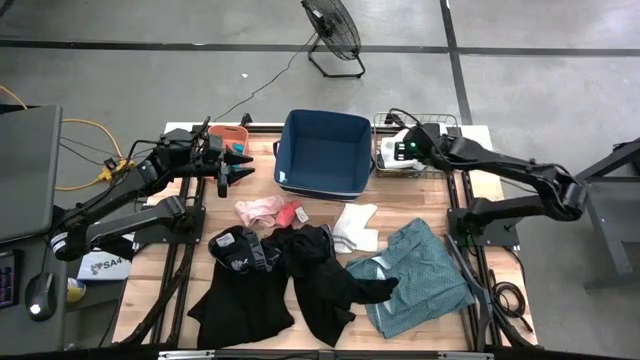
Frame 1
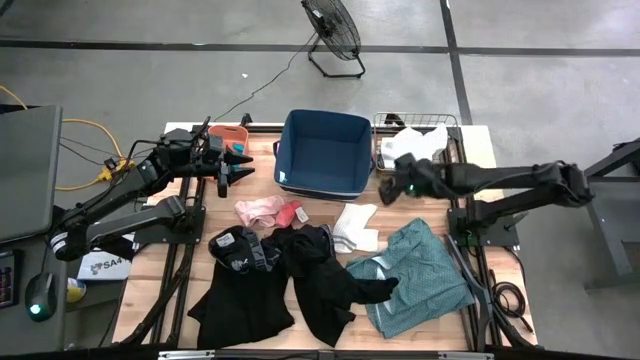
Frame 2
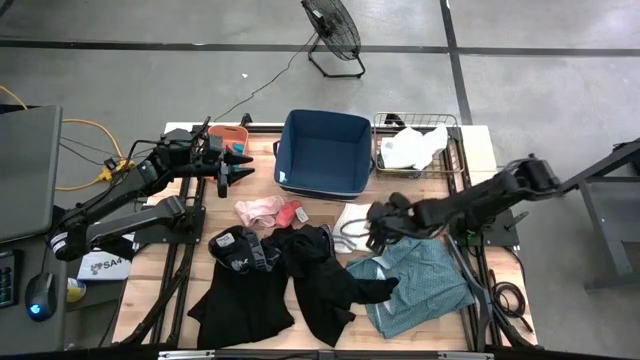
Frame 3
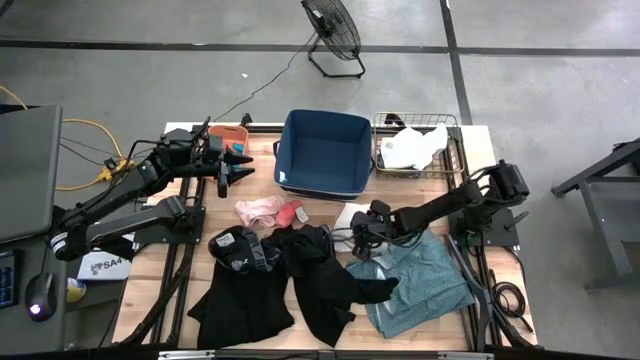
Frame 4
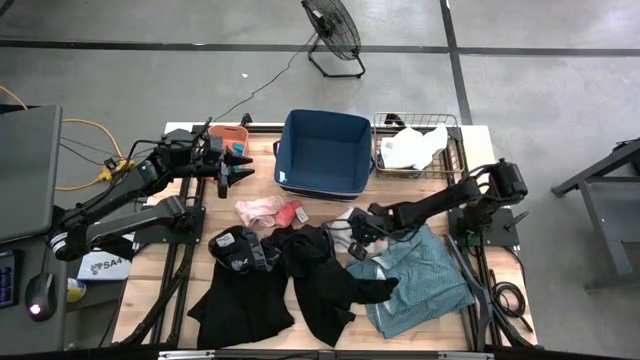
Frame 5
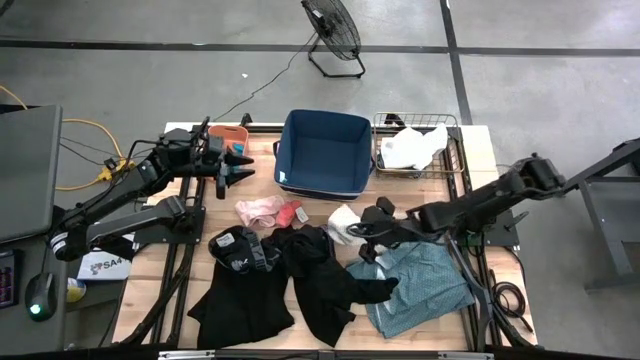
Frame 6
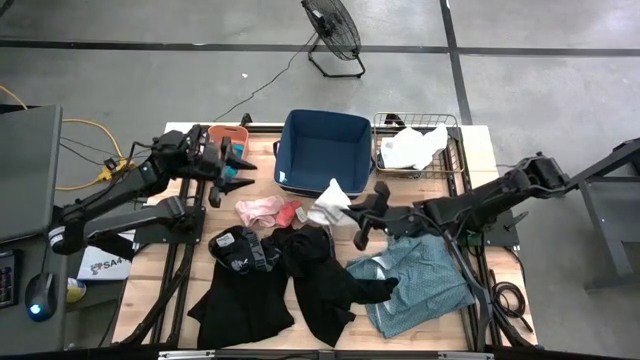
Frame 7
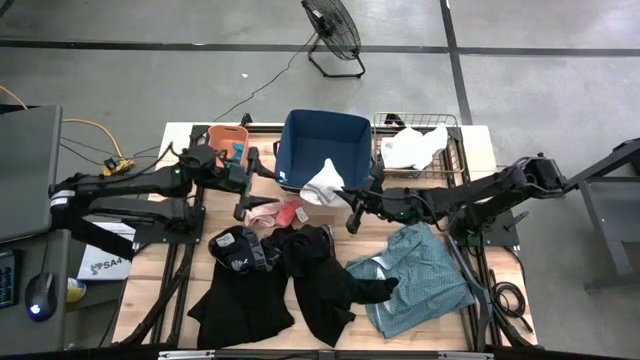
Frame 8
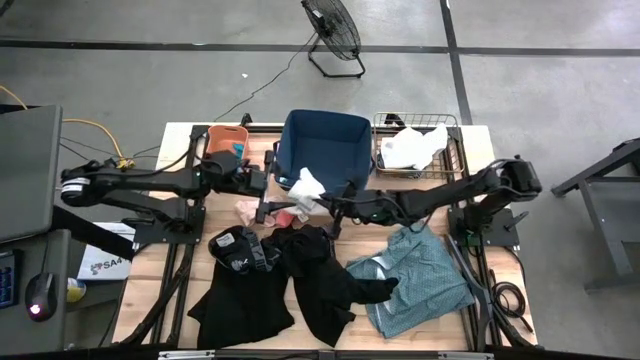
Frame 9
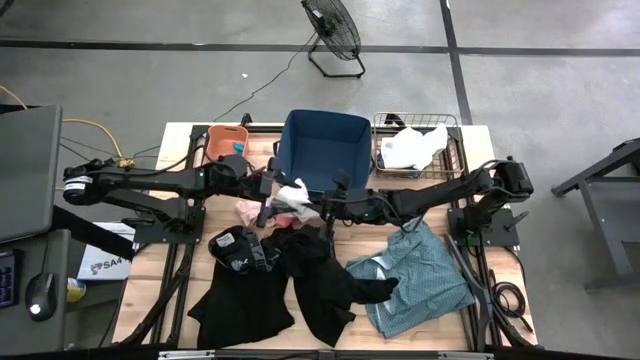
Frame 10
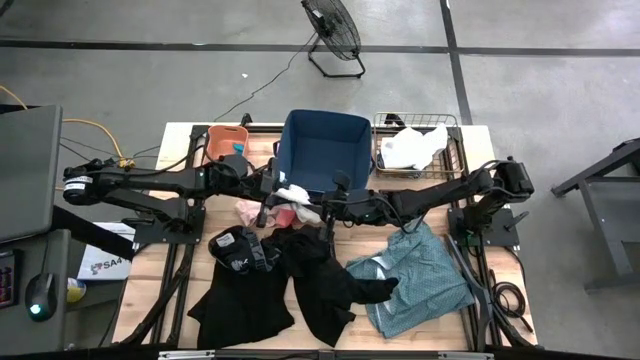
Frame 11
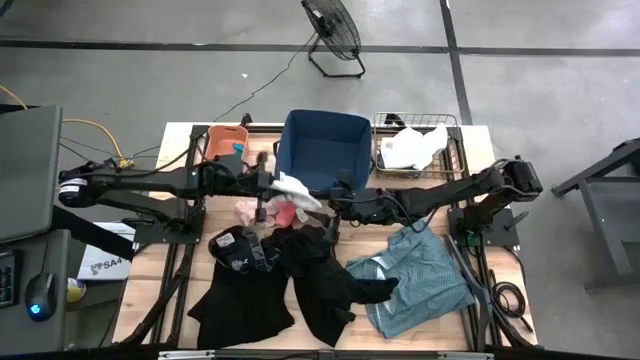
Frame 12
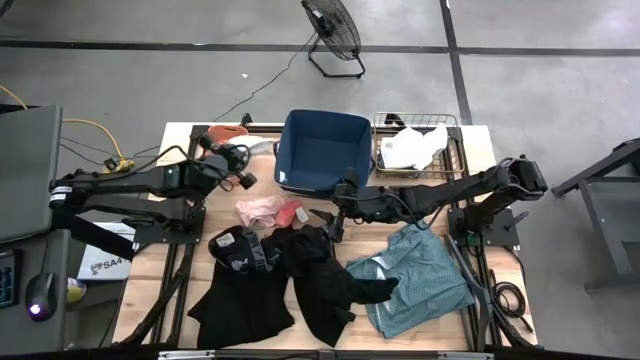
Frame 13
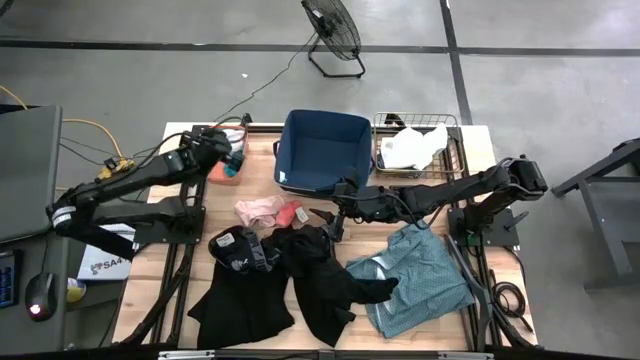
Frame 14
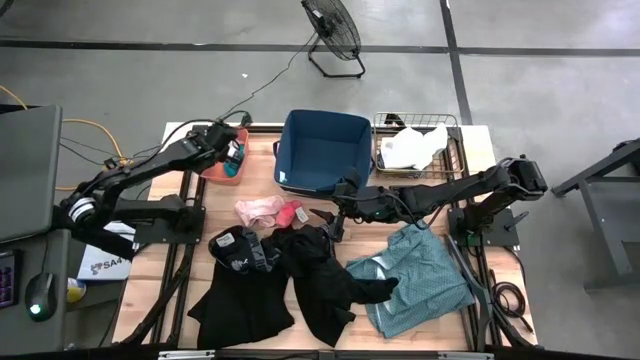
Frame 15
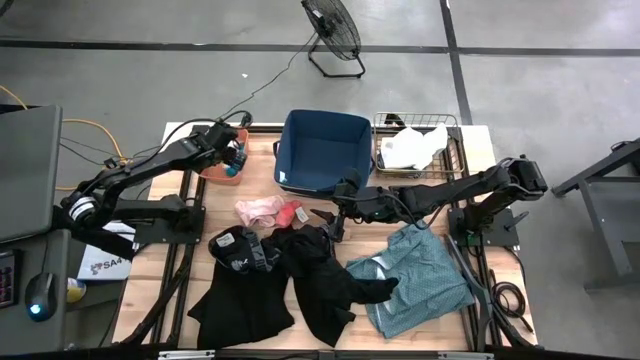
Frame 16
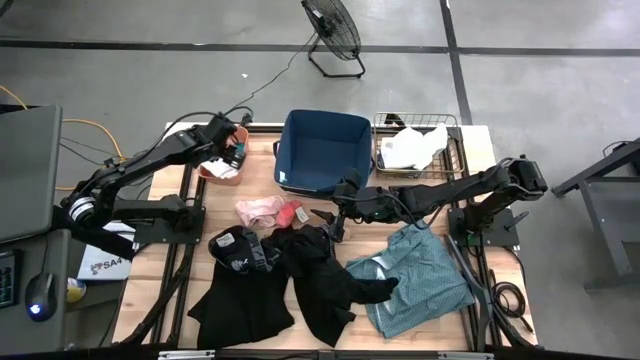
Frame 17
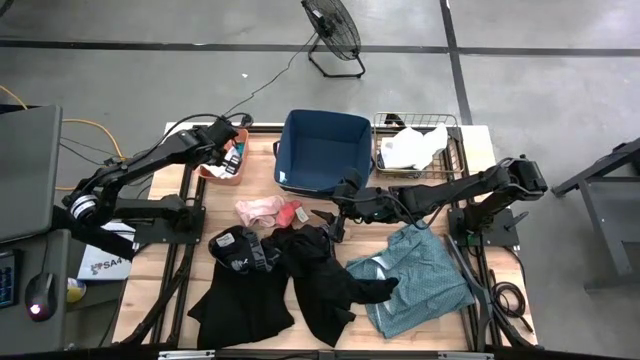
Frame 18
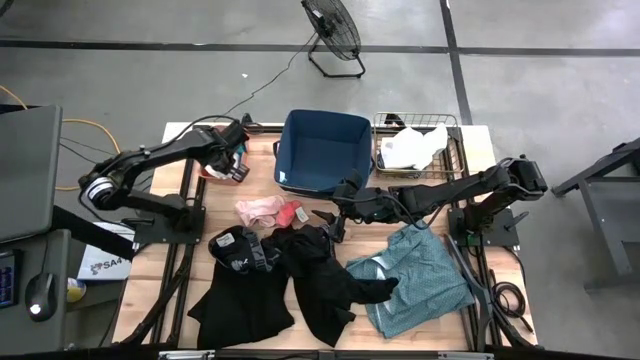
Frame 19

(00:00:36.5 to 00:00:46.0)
Task: Pick & Place Cloths
Put the white sock into the orange bin

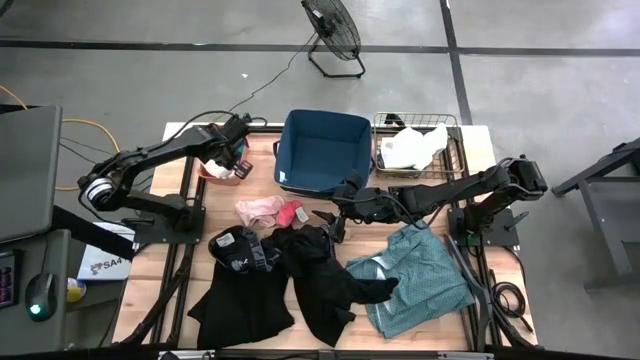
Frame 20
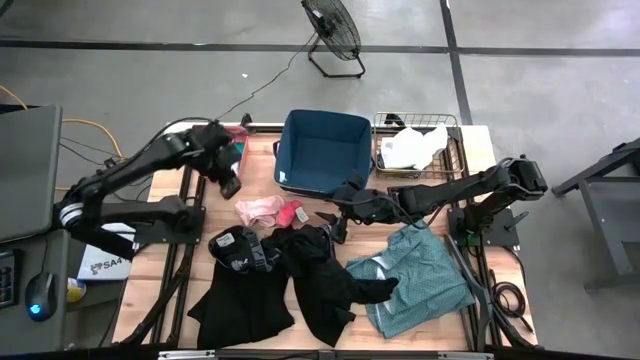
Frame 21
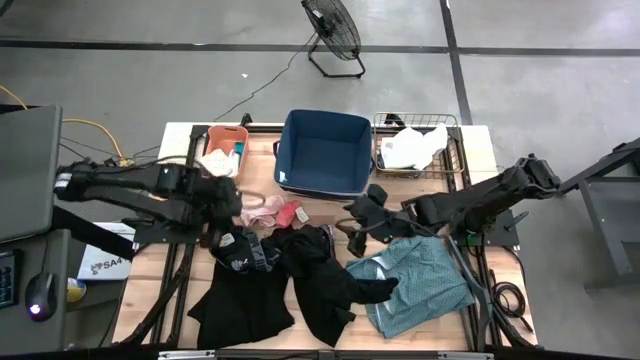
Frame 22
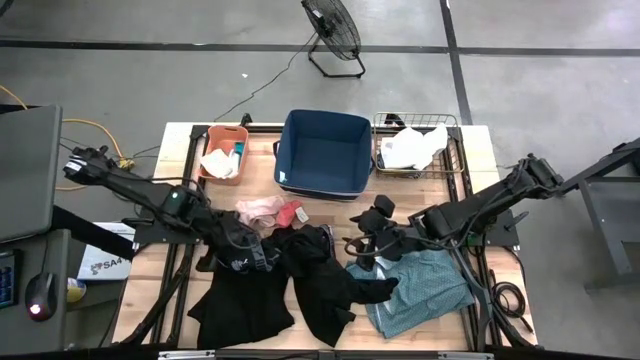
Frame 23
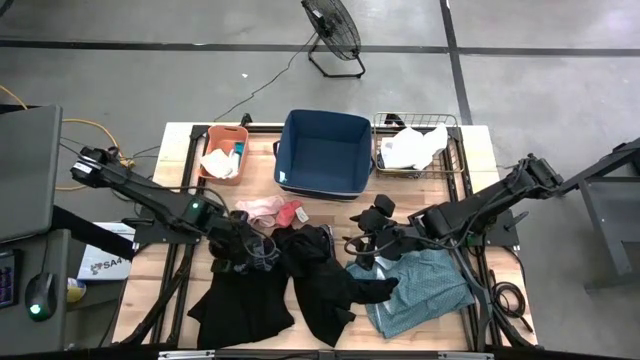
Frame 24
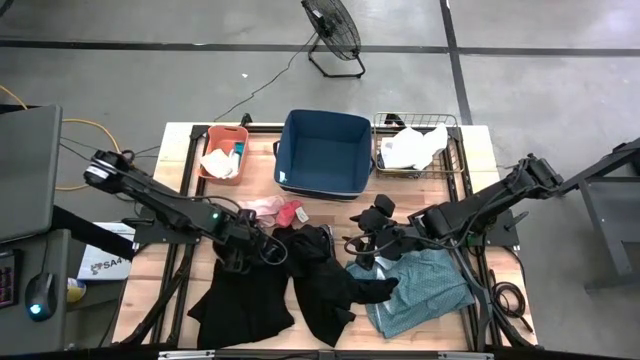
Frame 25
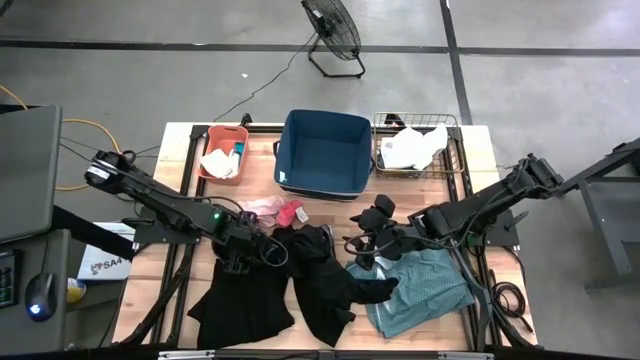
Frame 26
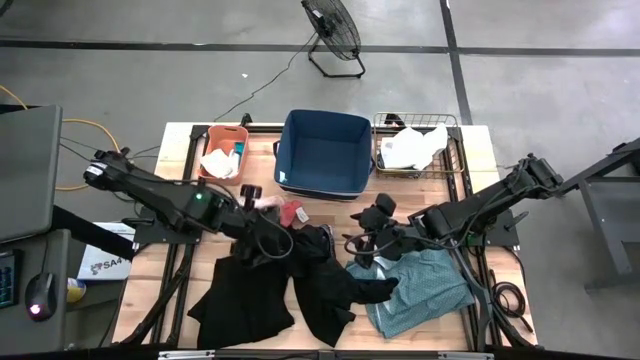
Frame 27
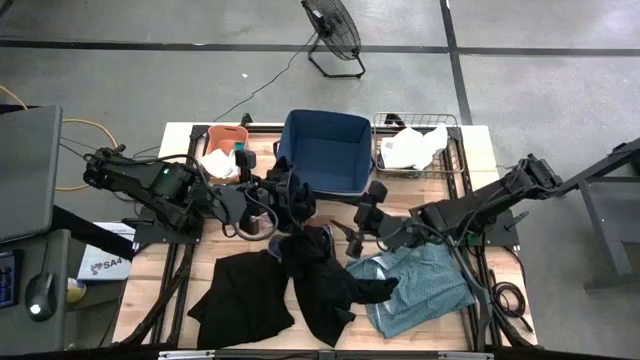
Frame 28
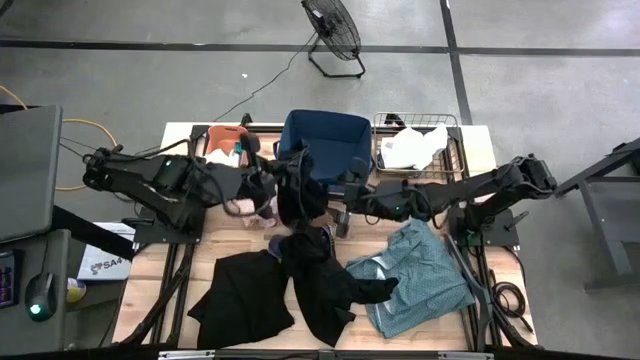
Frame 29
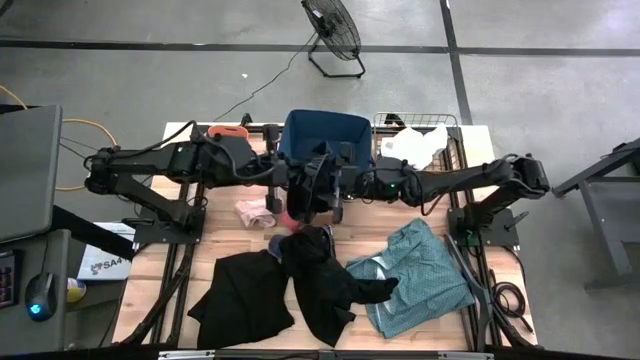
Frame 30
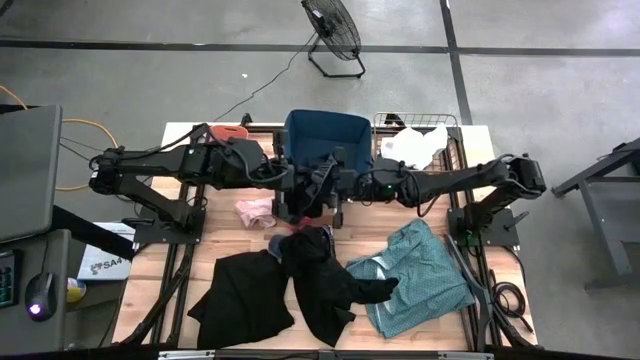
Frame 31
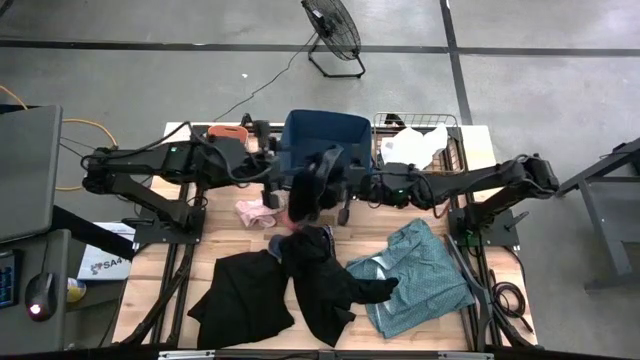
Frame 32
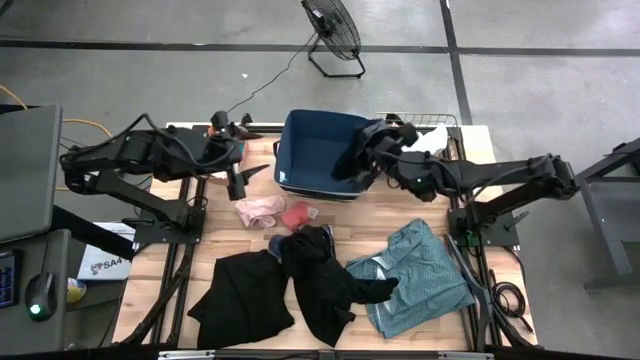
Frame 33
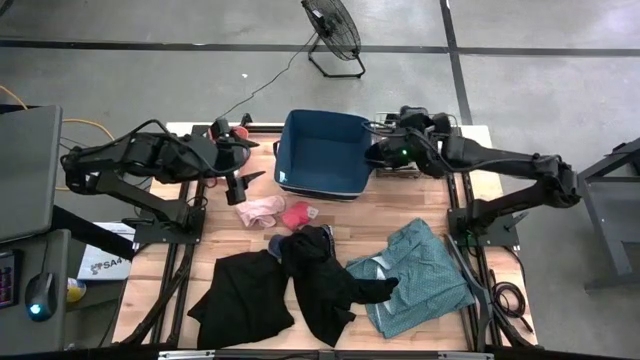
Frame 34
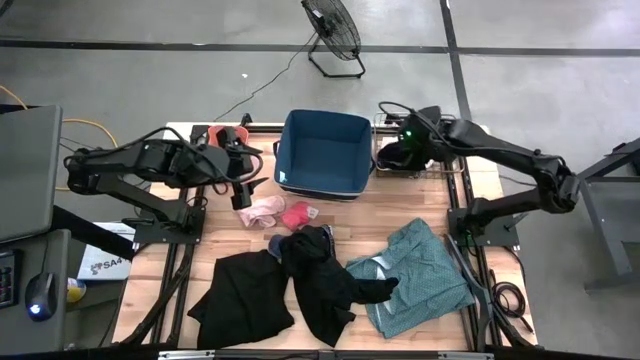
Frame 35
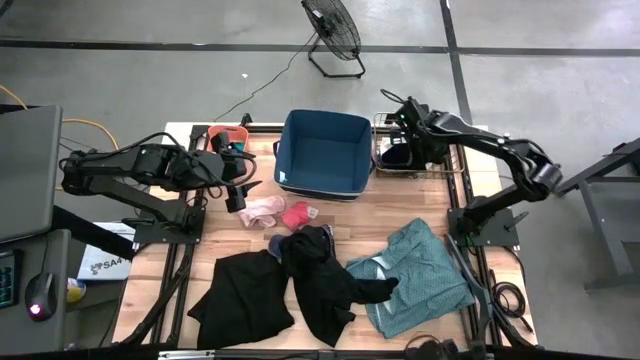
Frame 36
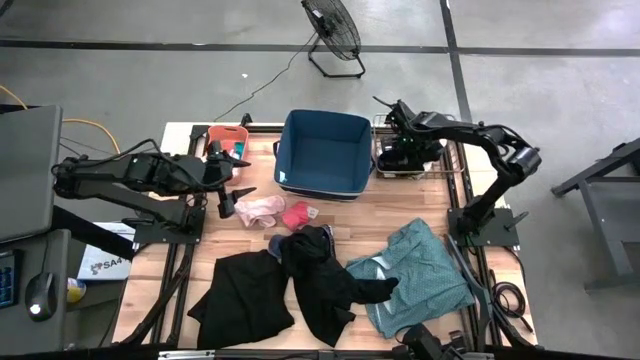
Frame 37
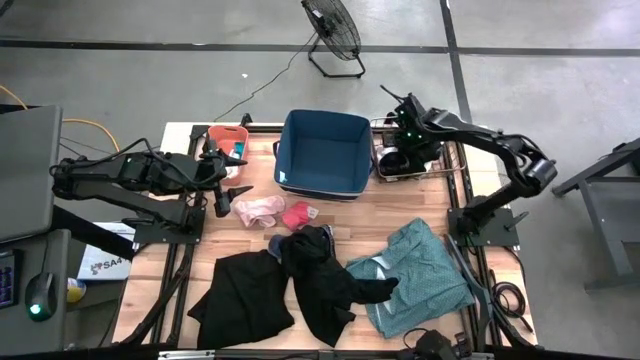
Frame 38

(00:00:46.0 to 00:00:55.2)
Put the left black boxer into the gold wire basket

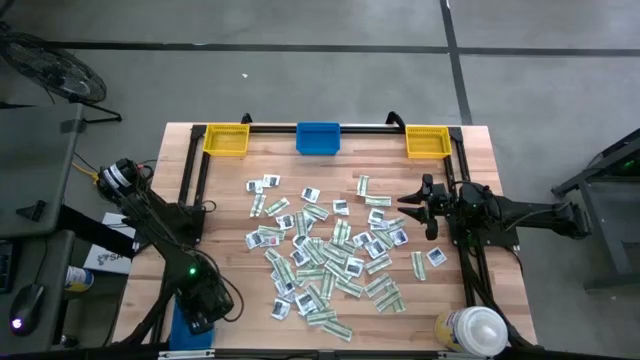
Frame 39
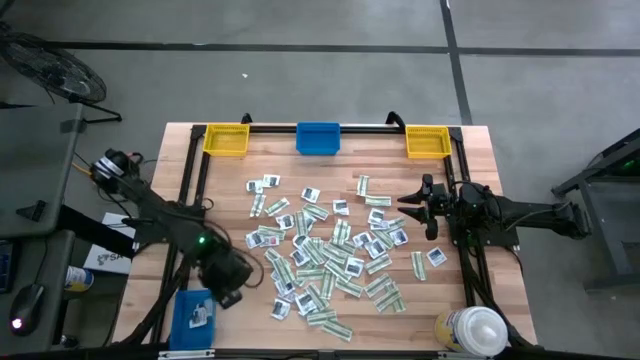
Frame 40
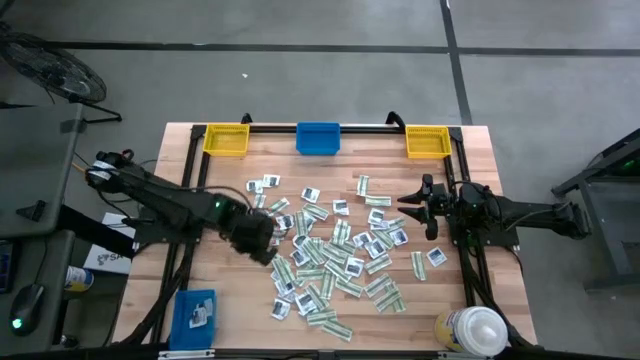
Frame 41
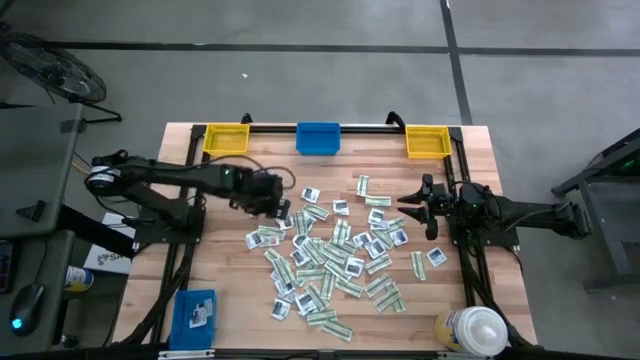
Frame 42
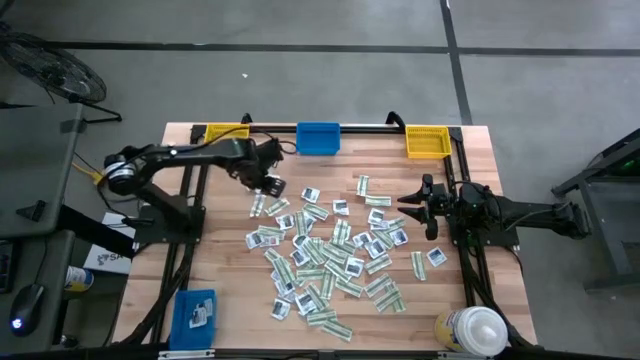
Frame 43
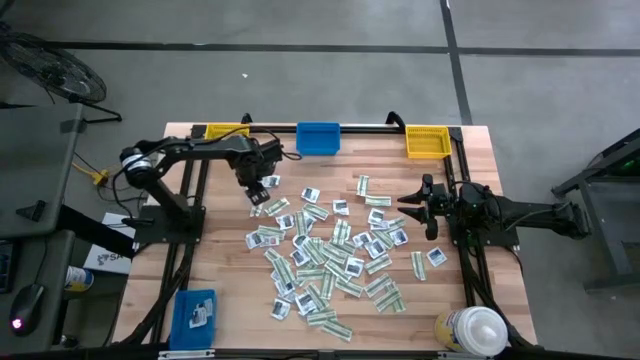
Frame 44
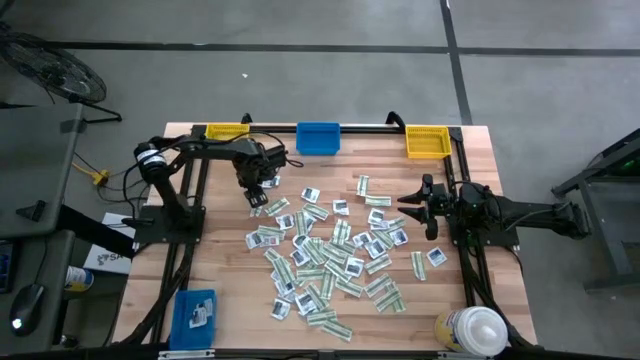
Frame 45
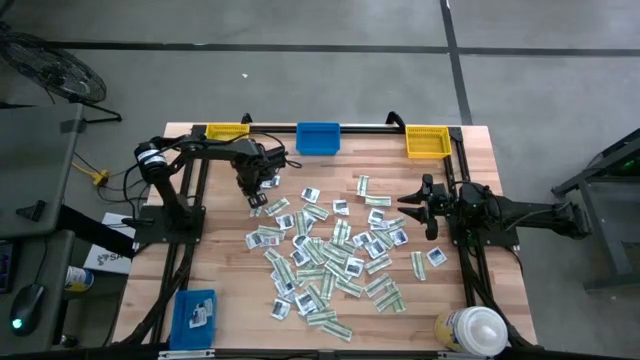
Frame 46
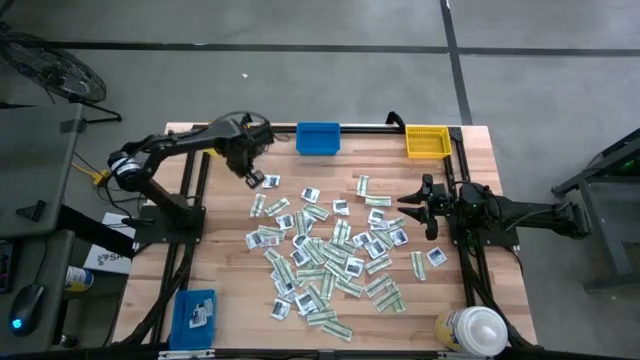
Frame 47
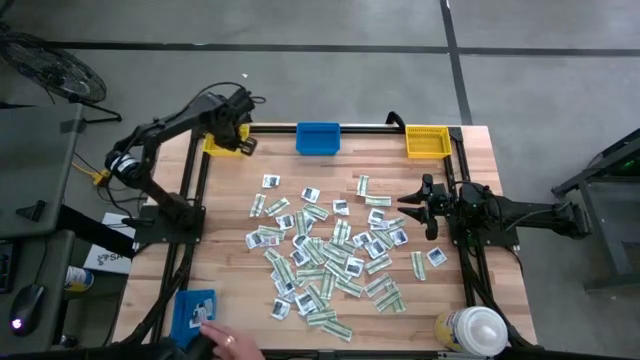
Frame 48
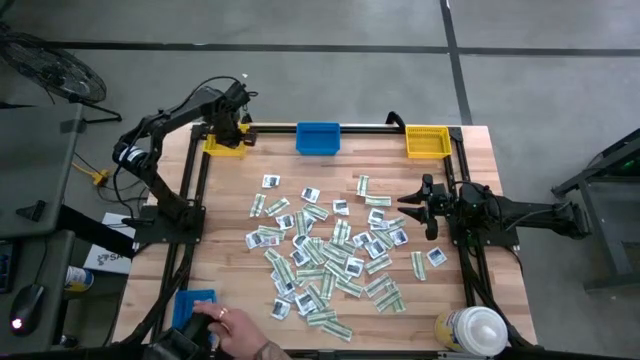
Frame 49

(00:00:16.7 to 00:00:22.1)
Task: Pick & Place First Aid Supplies
Put the gray towelette pack into the left yellow bin
